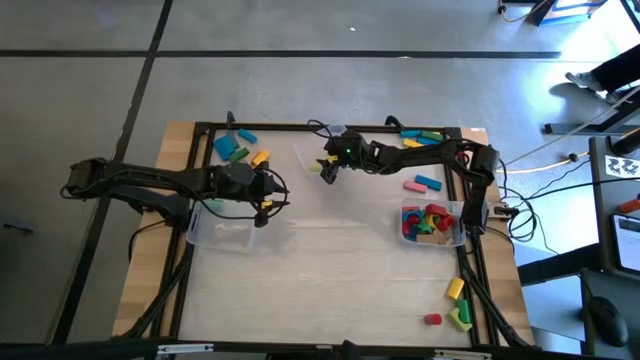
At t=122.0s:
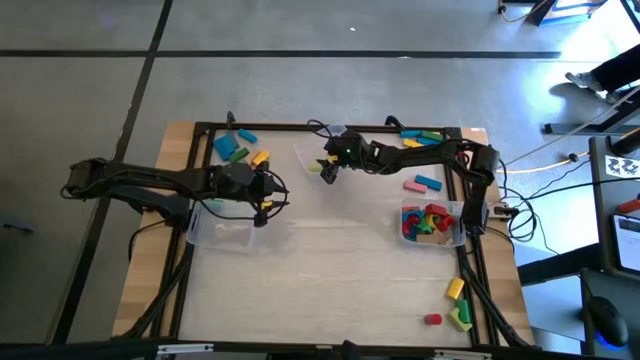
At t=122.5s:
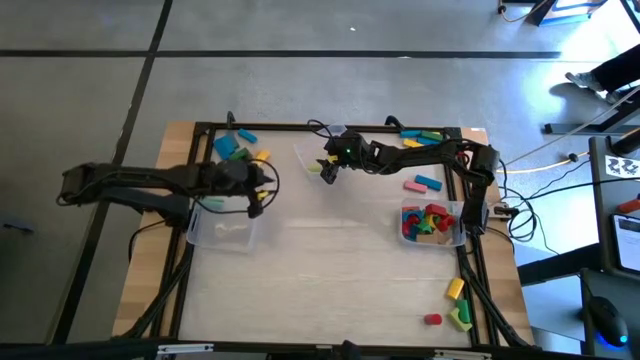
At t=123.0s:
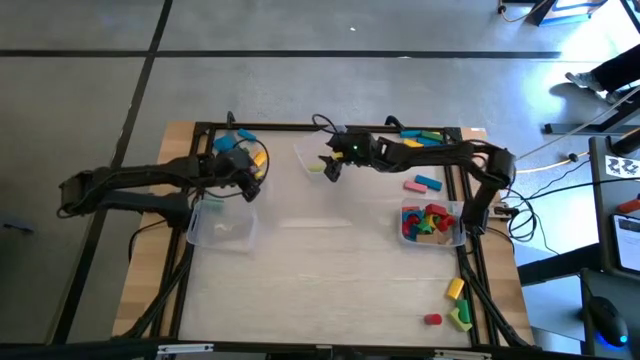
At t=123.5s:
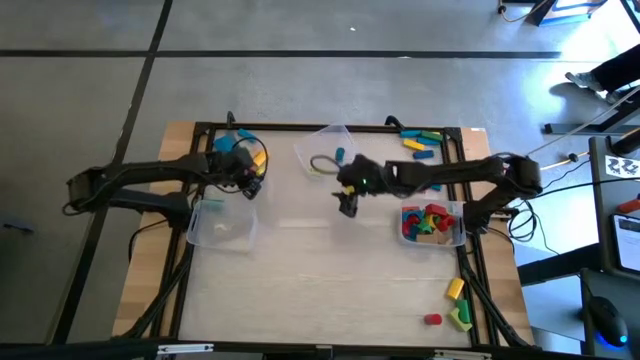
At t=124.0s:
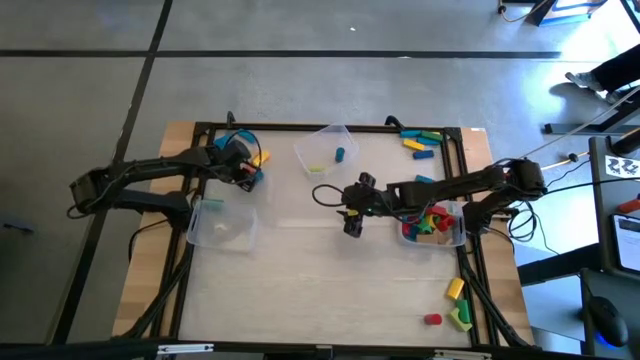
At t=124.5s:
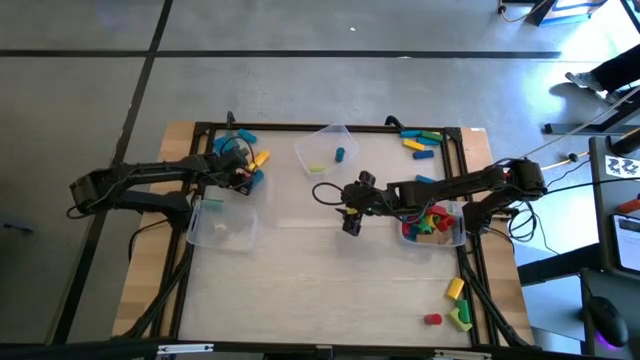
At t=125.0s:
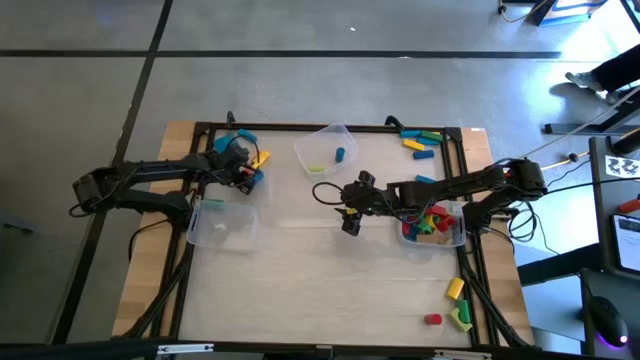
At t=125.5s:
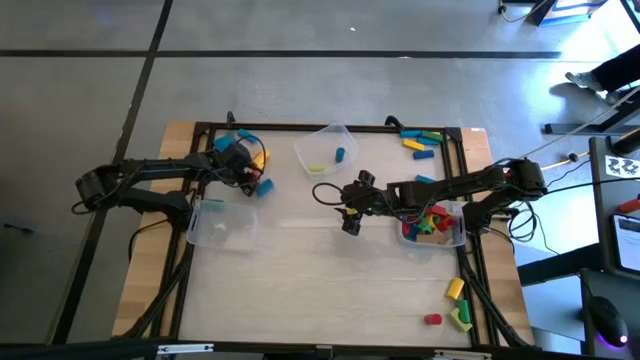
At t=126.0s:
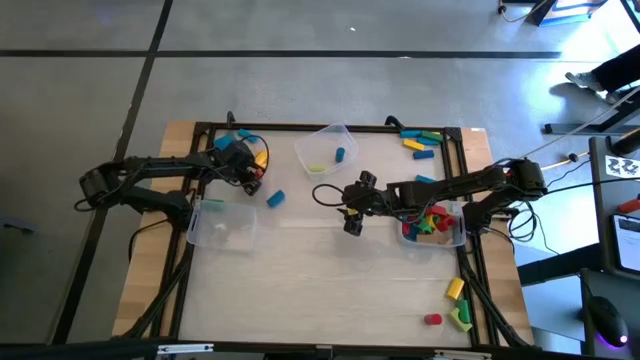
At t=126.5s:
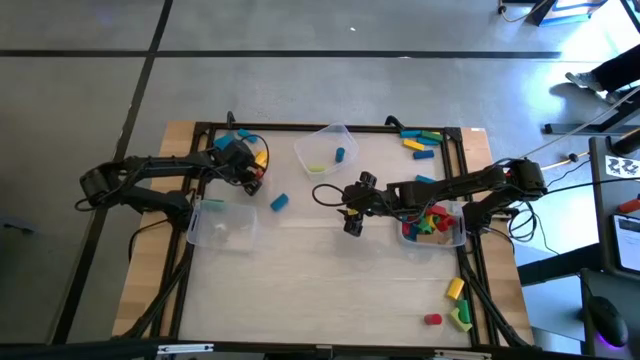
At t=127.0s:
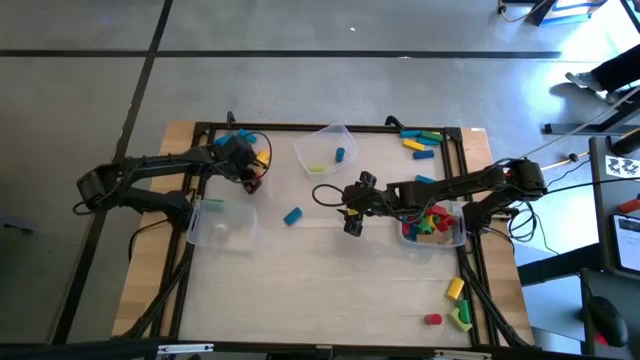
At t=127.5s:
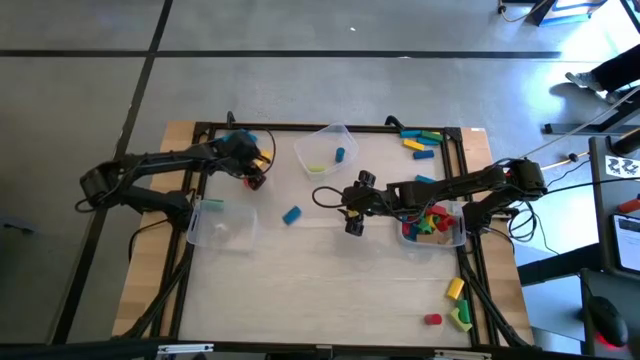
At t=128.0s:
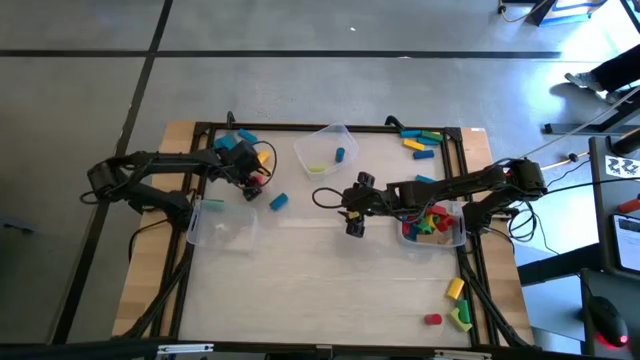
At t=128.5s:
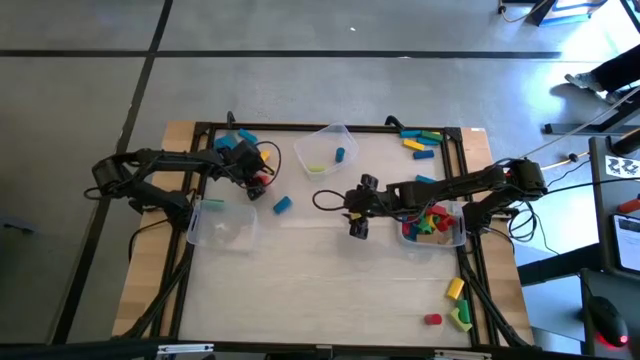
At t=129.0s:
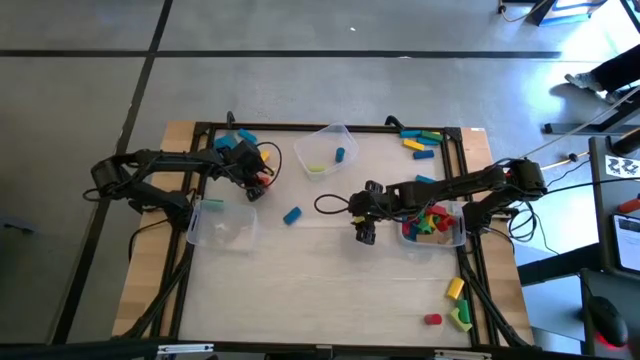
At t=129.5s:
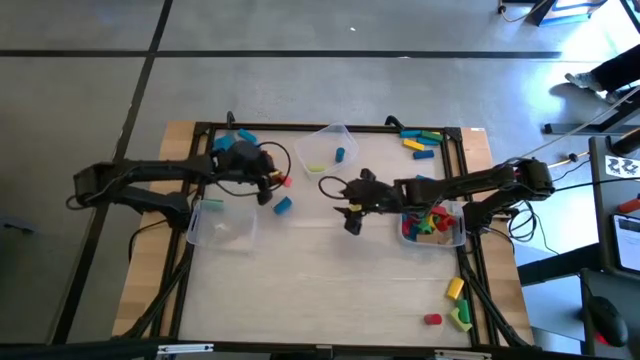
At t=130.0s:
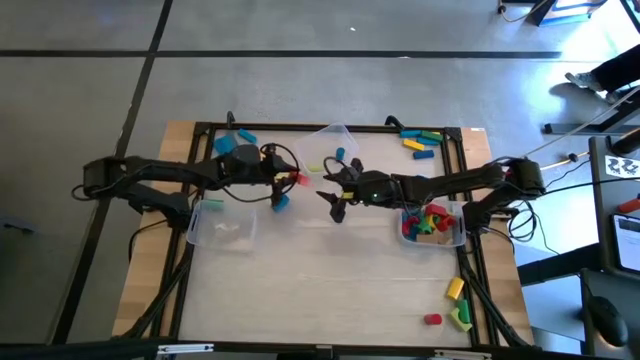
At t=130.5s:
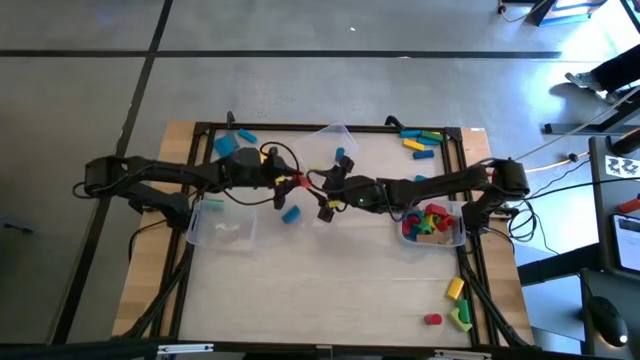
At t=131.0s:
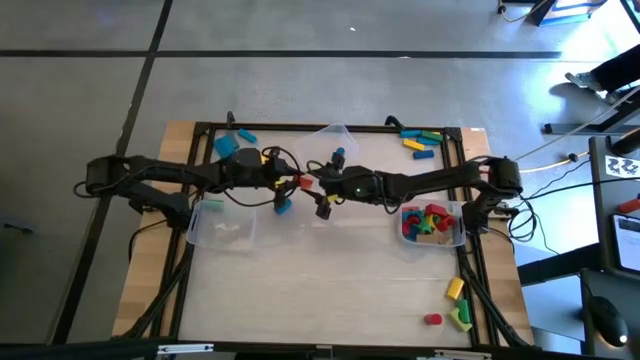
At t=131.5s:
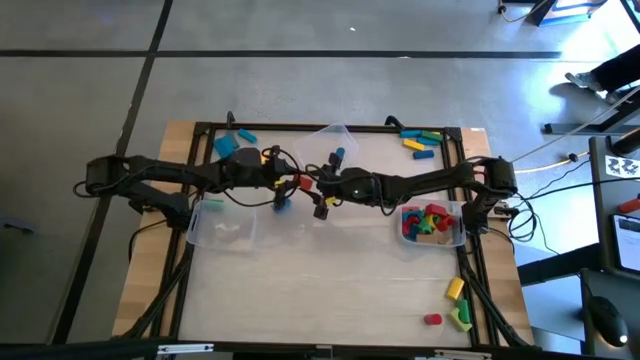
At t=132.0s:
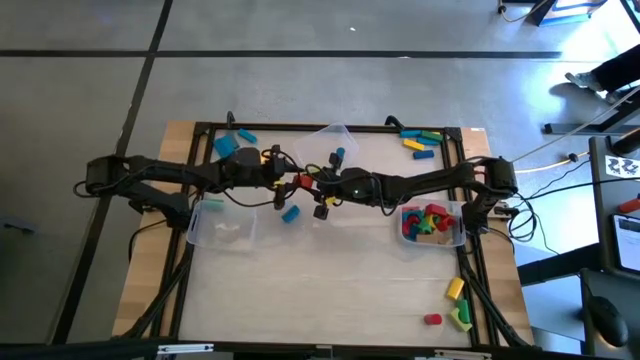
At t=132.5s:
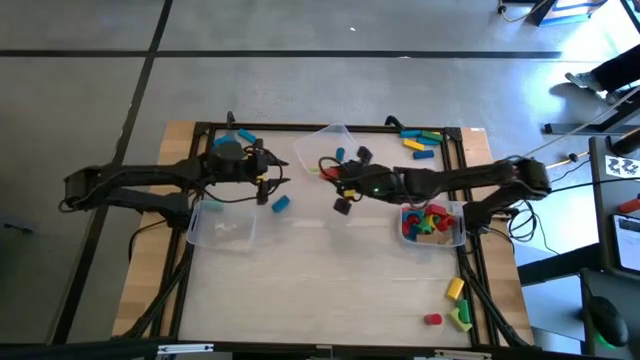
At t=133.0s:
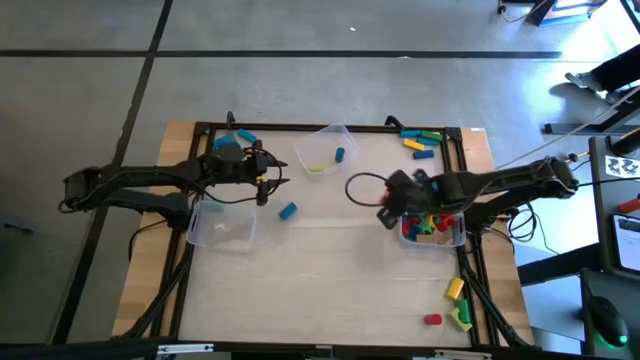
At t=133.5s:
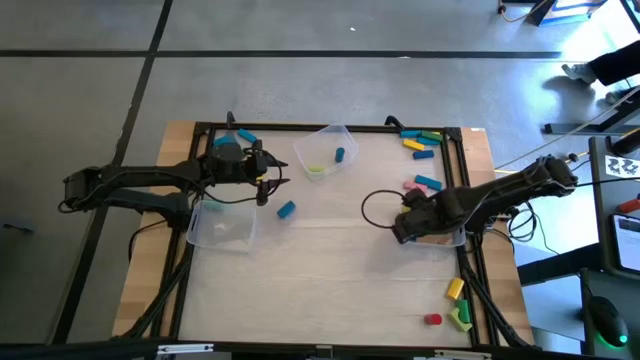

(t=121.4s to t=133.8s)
Task: Sort blocks by size
Put the orange arch block into the bottom right transparent bin

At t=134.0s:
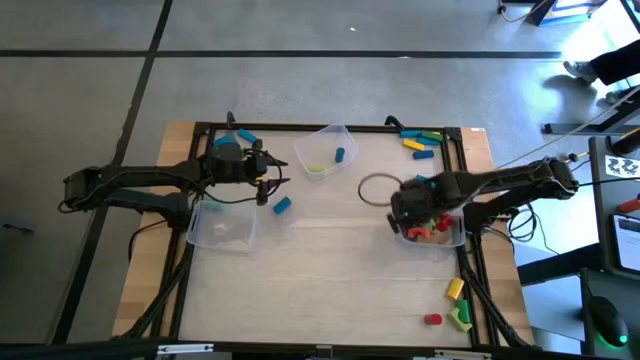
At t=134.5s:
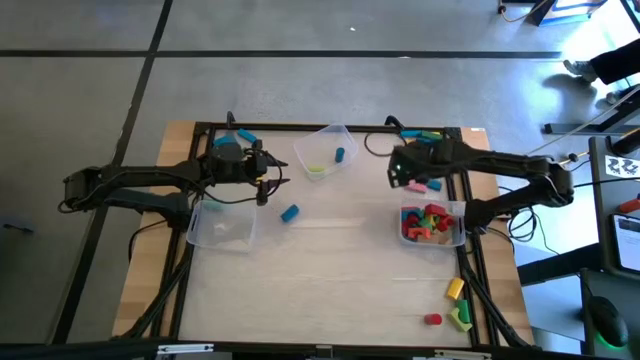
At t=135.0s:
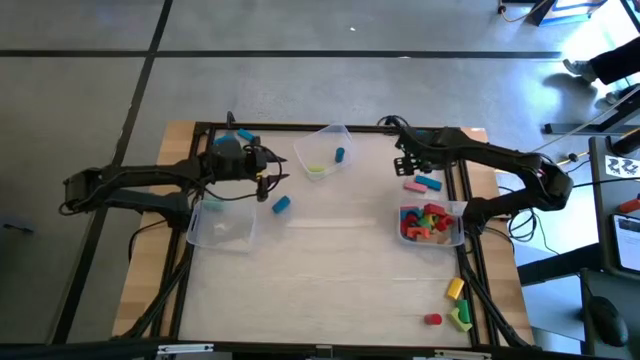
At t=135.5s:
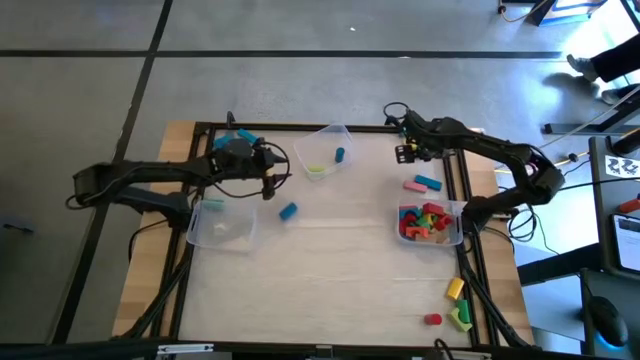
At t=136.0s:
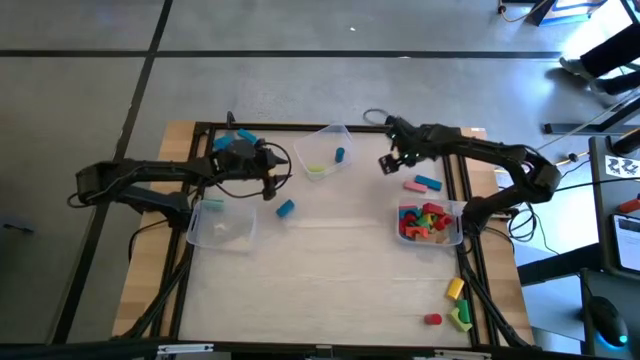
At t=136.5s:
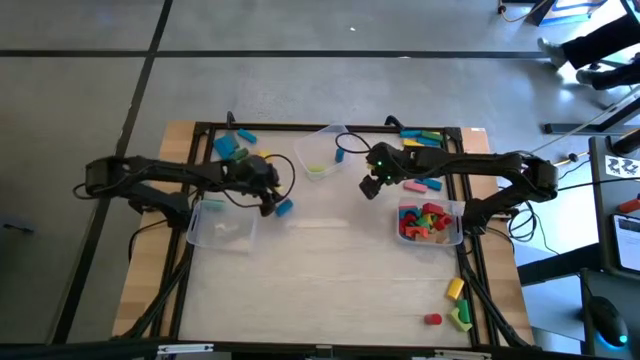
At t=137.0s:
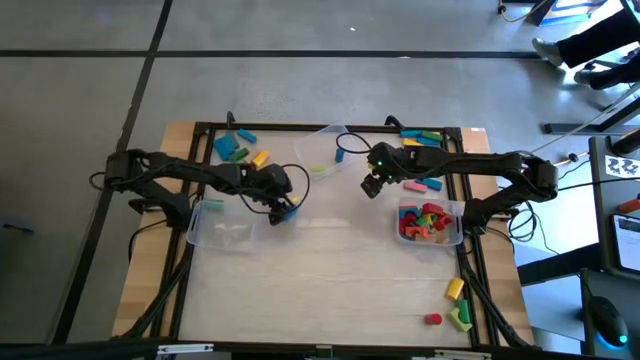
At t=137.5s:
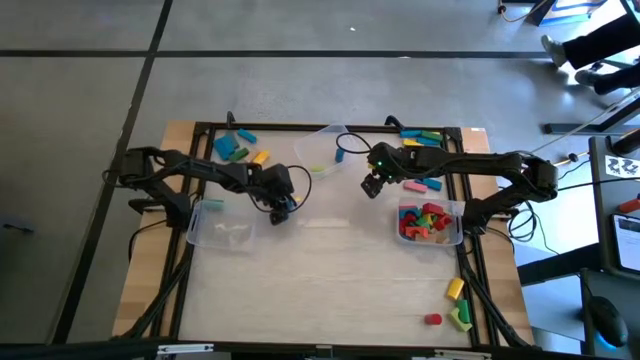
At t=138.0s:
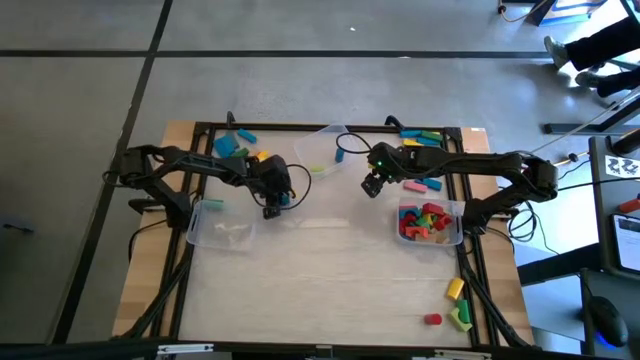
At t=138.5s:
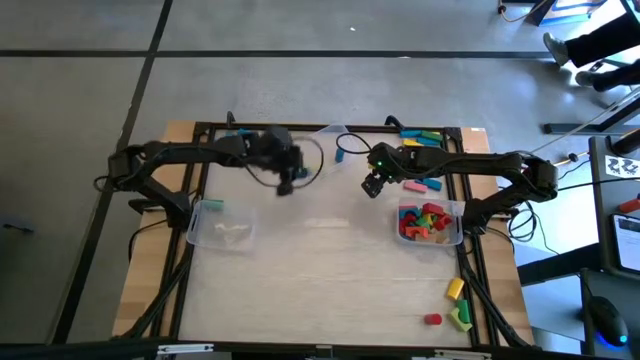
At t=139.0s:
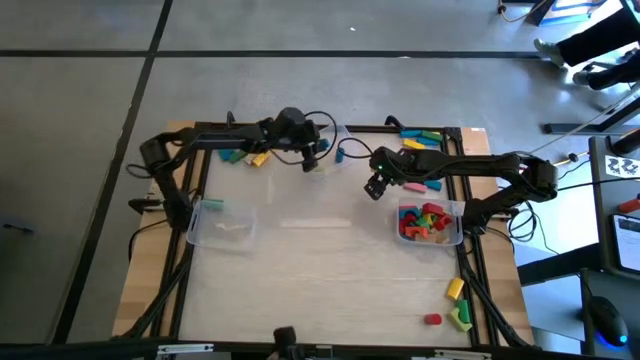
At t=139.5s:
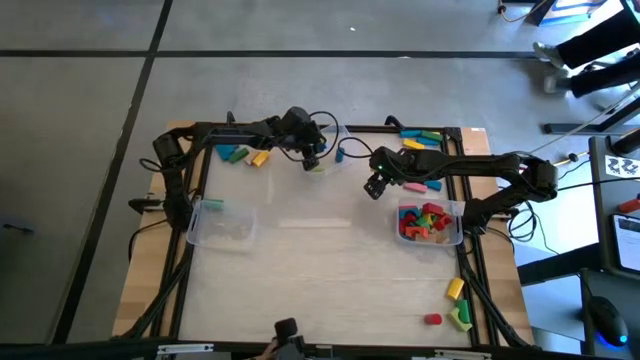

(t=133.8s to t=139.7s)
Put the blue cylindrical block into the top transparent bin

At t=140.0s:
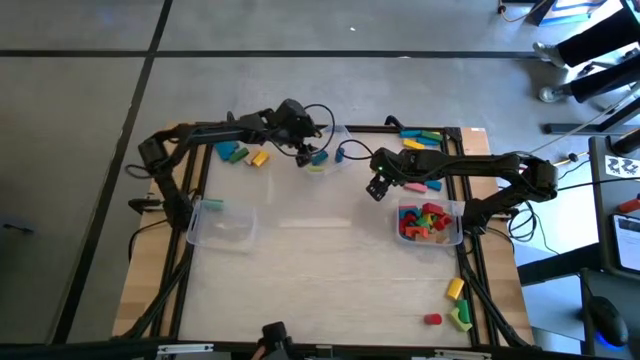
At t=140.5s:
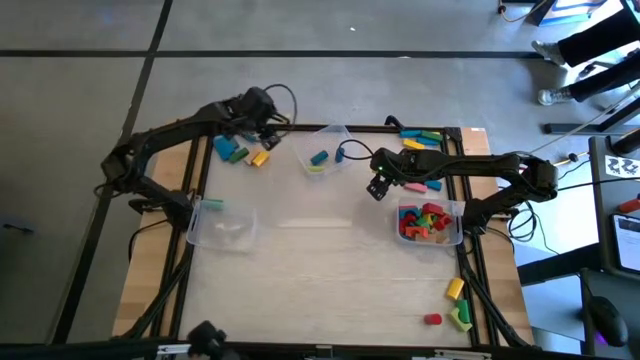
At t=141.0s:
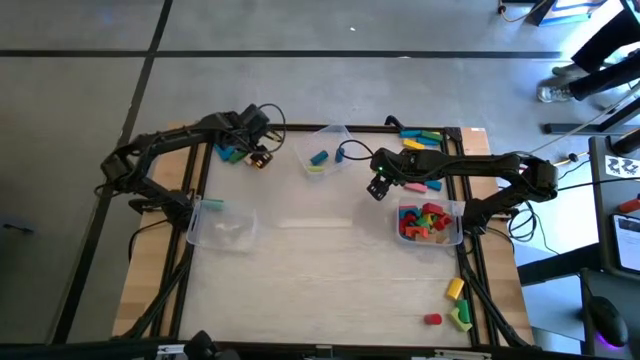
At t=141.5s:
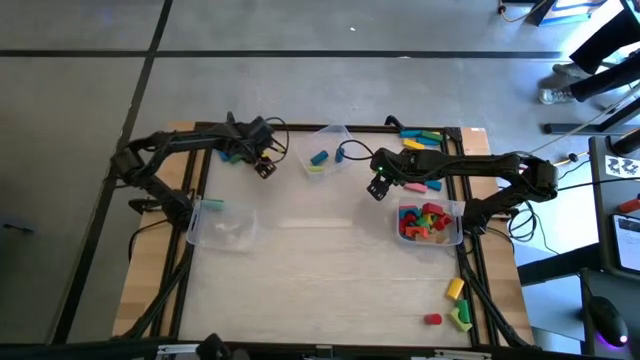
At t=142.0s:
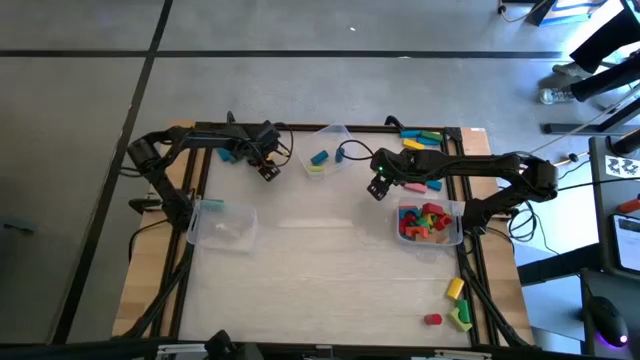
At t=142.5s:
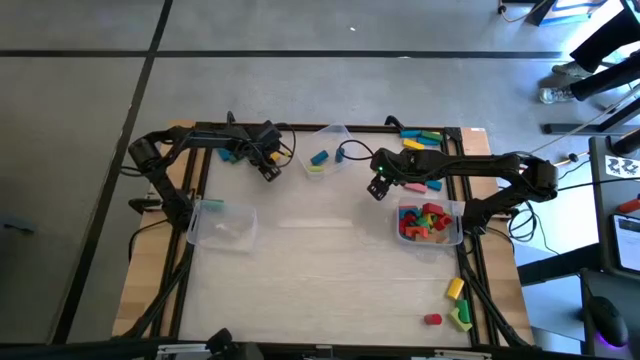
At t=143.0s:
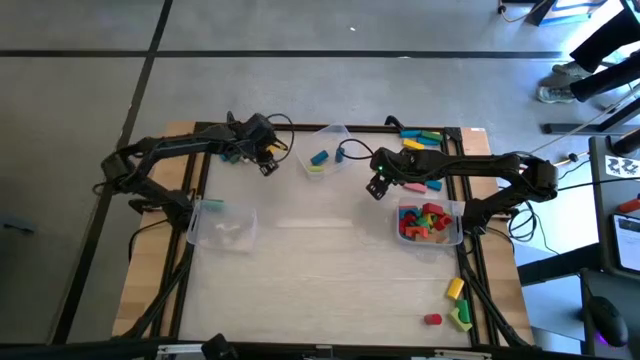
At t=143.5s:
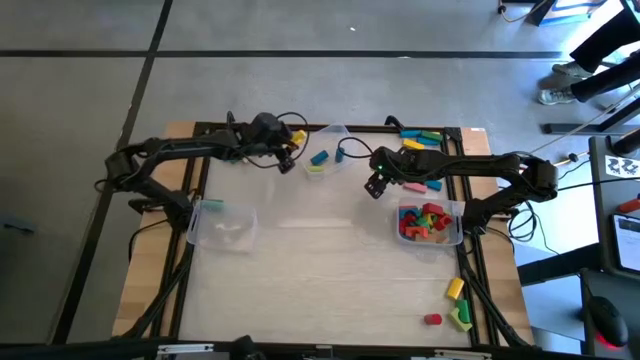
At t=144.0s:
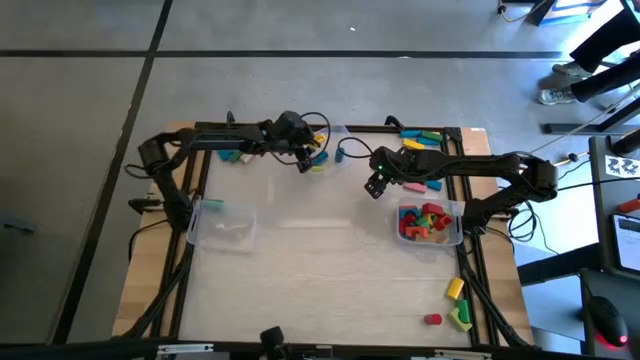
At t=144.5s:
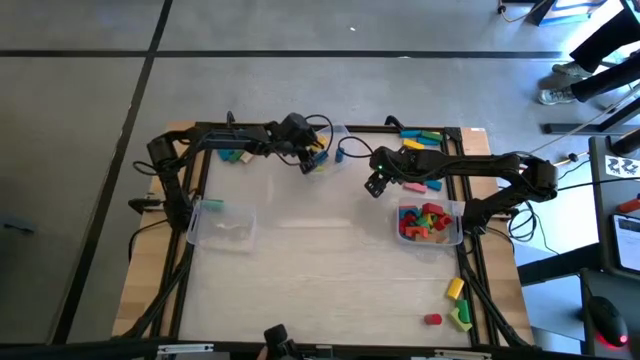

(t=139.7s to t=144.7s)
Put the yellow cylindrical block into the top transparent bin
